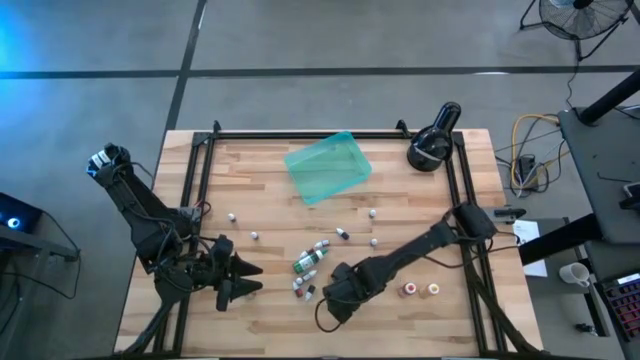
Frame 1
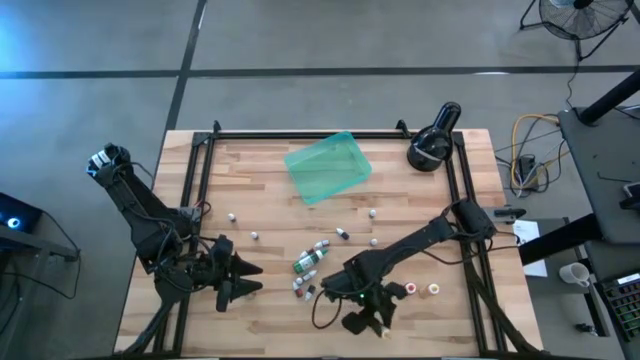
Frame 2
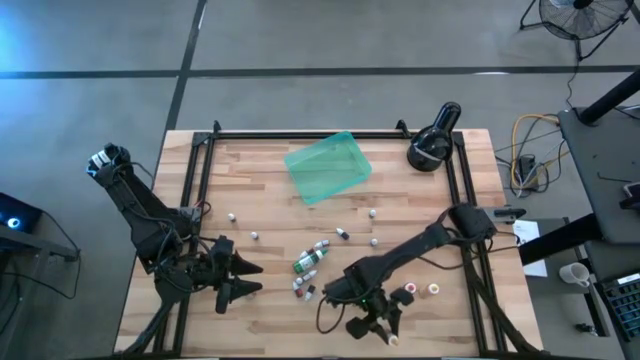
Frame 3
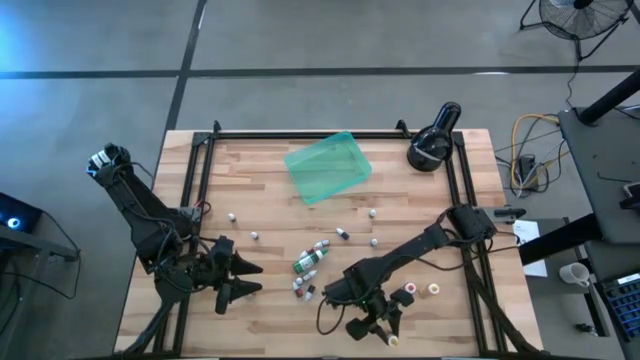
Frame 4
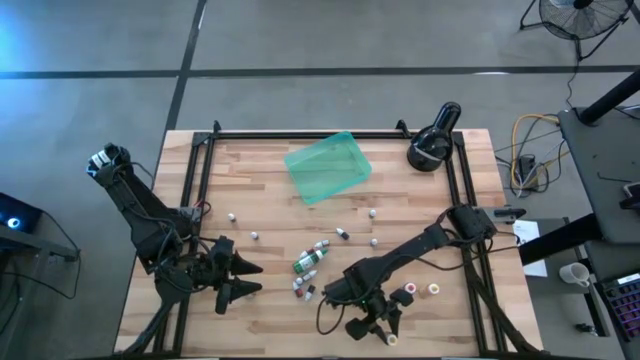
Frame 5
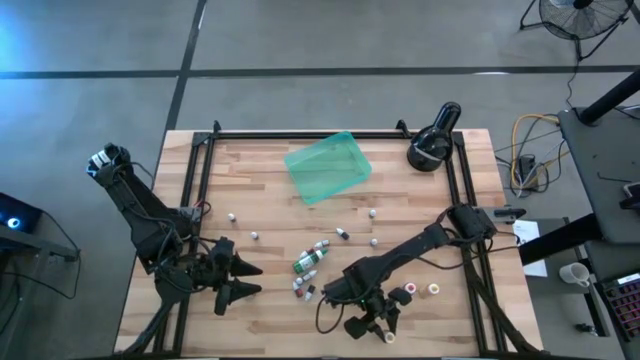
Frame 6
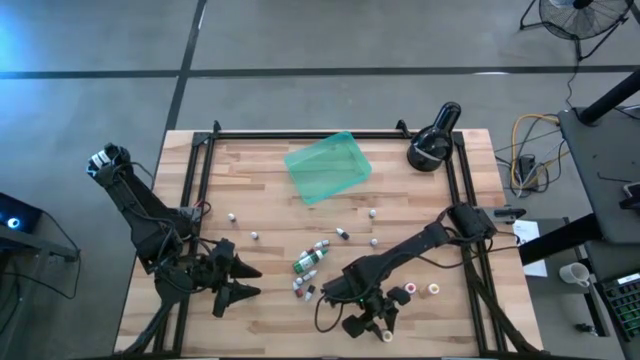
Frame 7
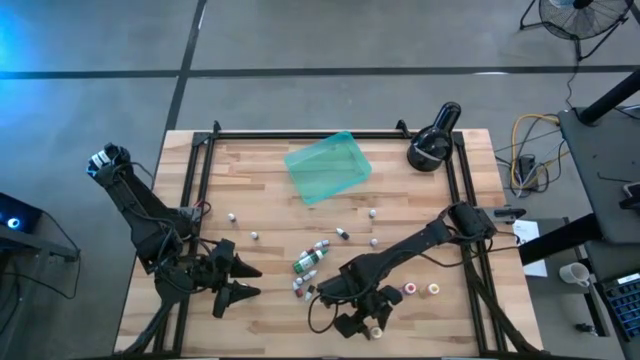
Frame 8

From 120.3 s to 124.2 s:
Task: Pick & Place food coloring
Adjust the yellow small food coloring bottle

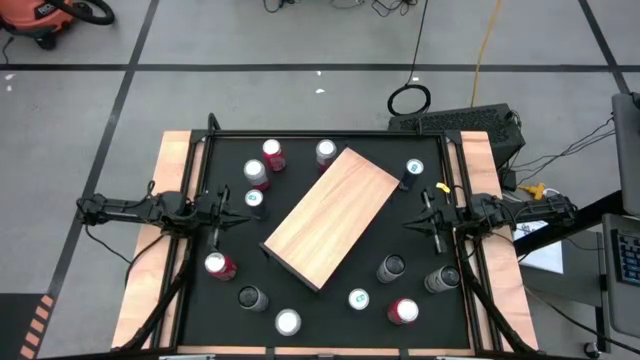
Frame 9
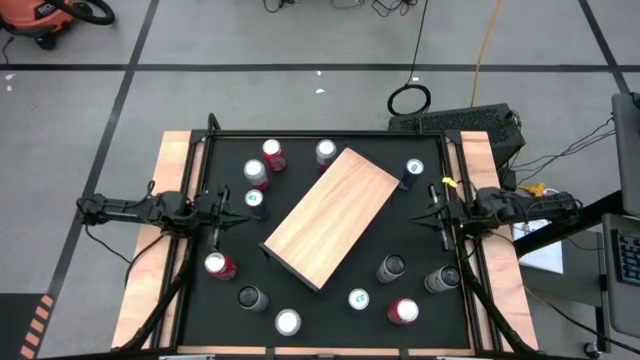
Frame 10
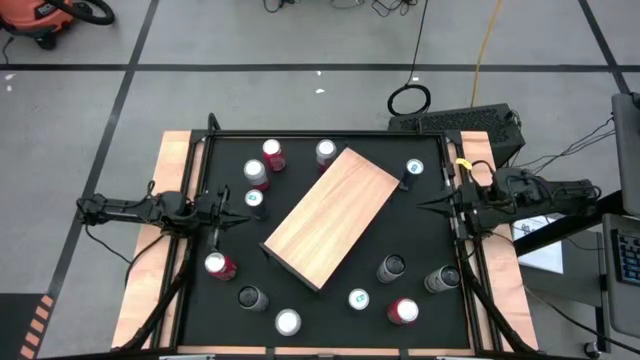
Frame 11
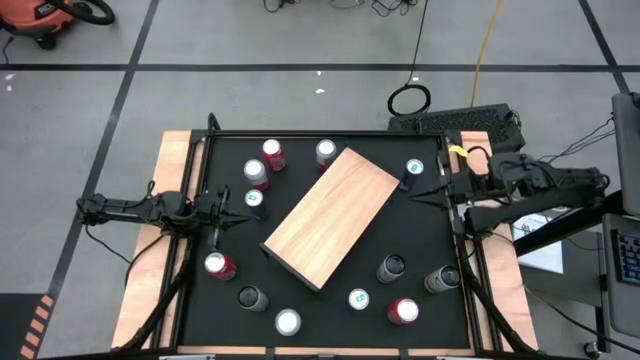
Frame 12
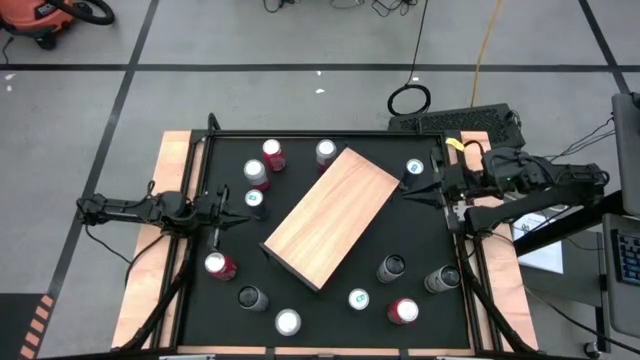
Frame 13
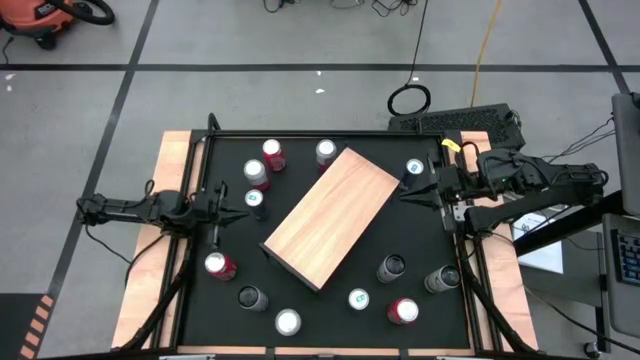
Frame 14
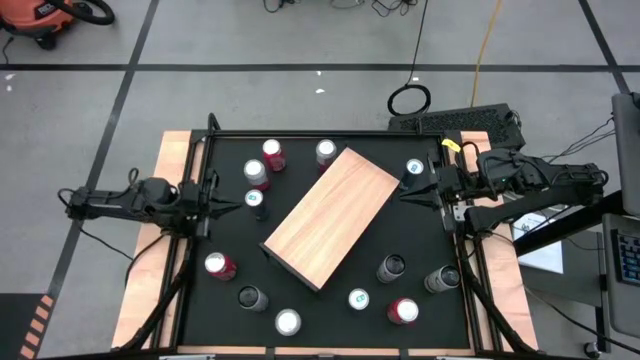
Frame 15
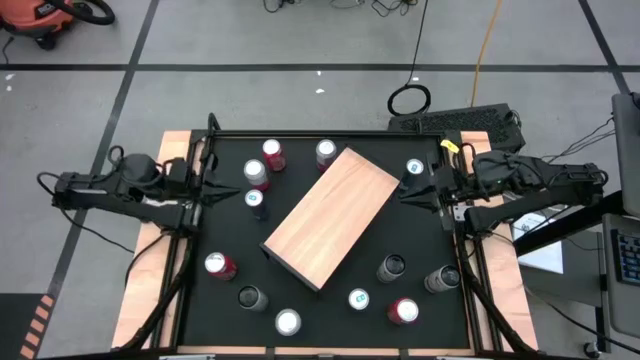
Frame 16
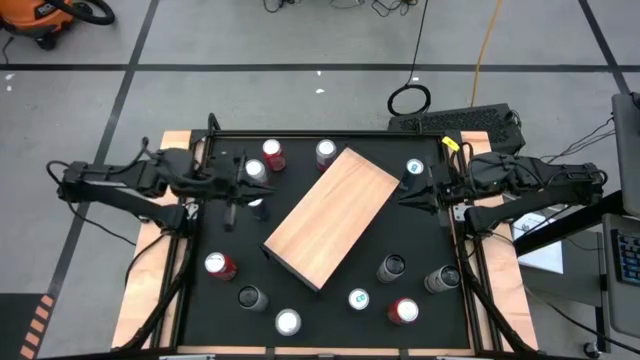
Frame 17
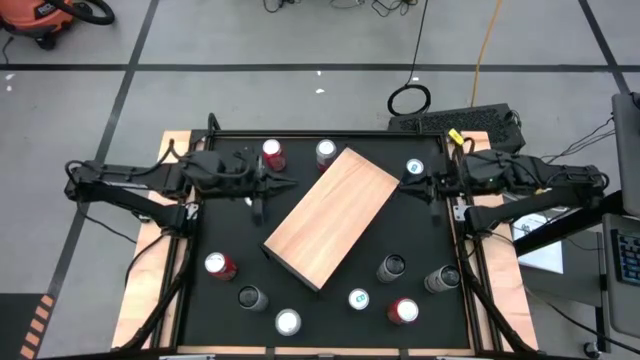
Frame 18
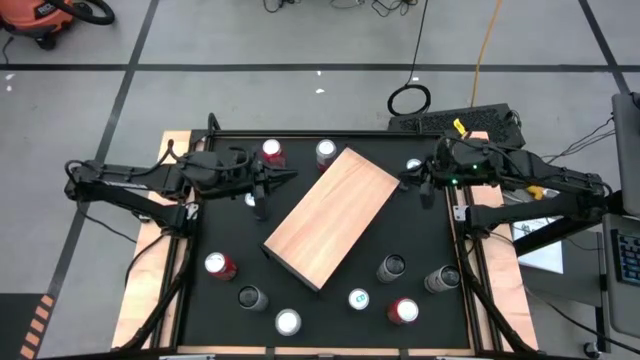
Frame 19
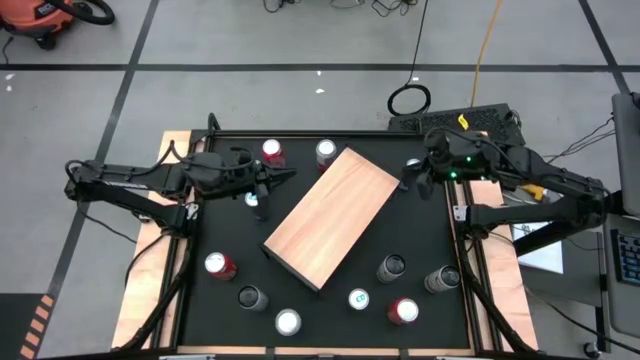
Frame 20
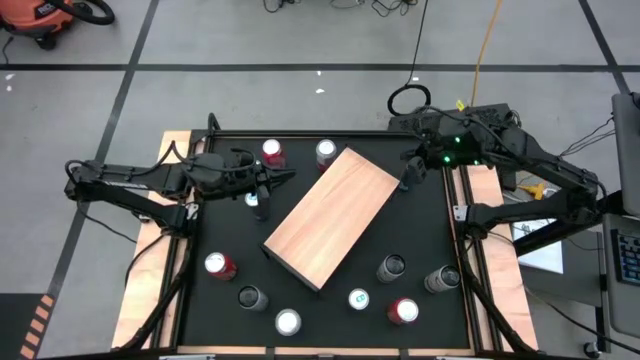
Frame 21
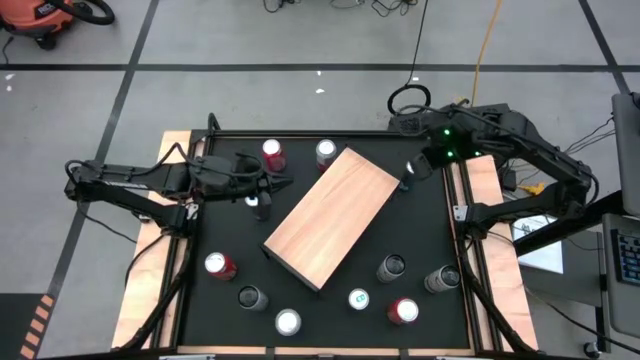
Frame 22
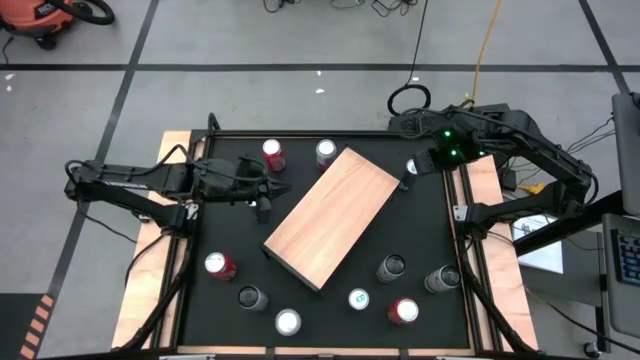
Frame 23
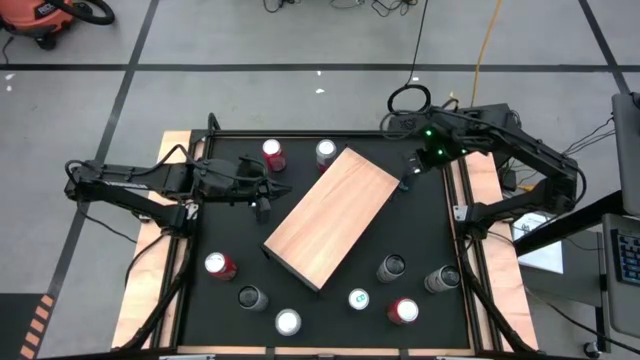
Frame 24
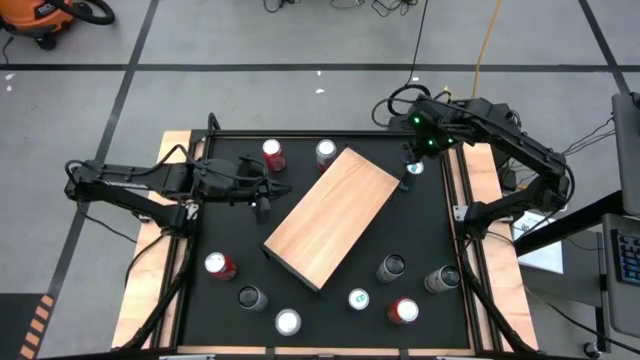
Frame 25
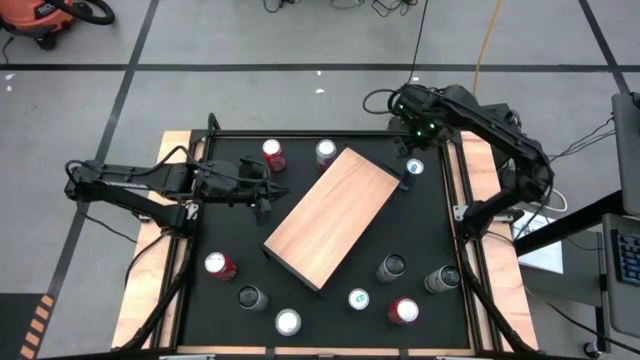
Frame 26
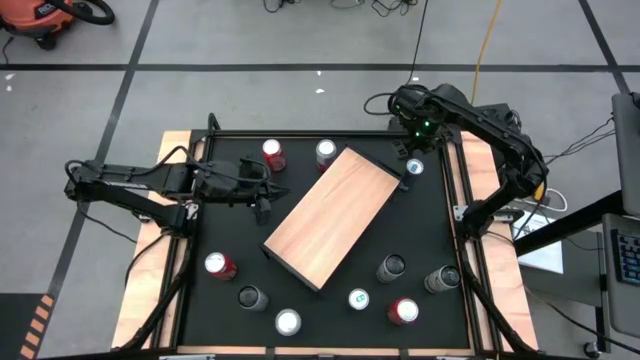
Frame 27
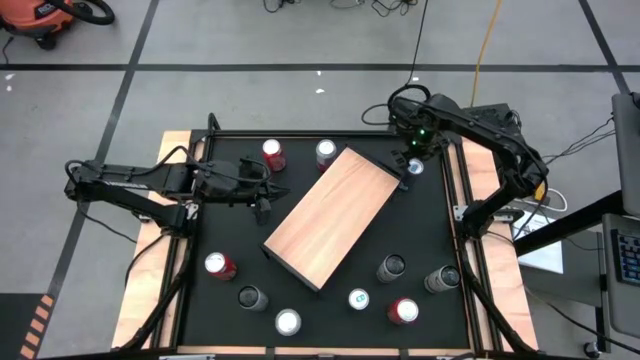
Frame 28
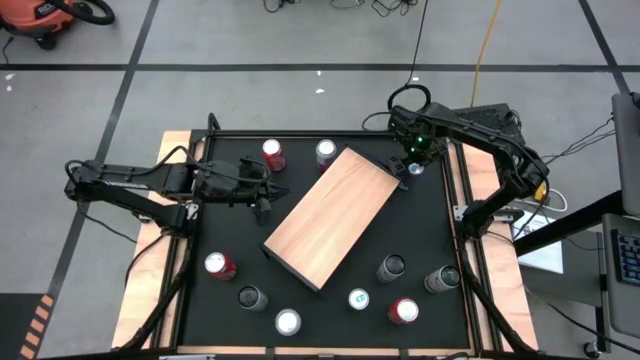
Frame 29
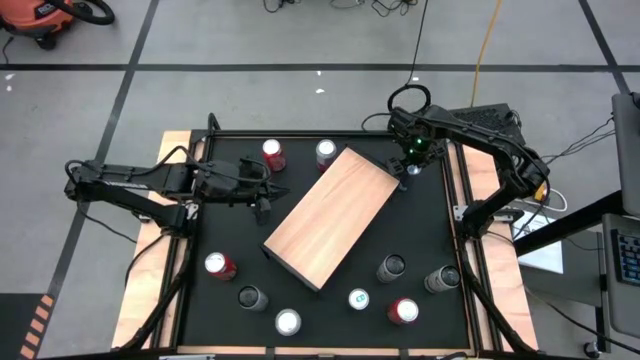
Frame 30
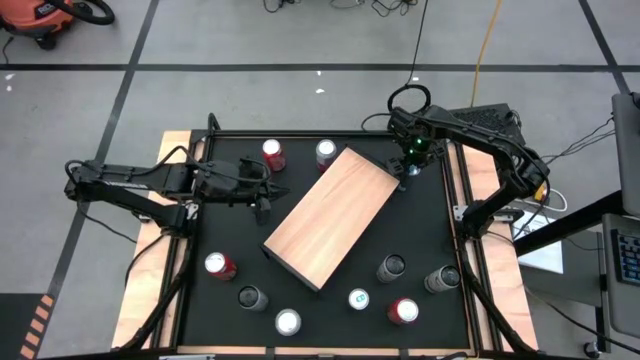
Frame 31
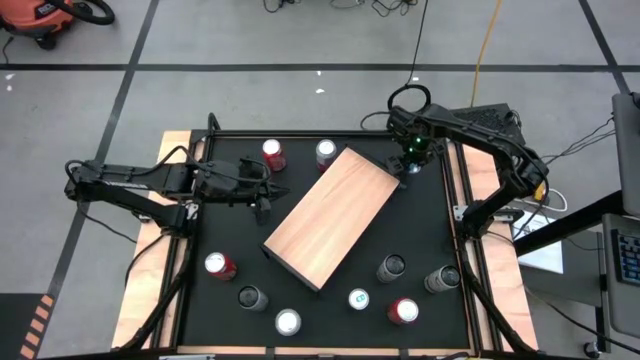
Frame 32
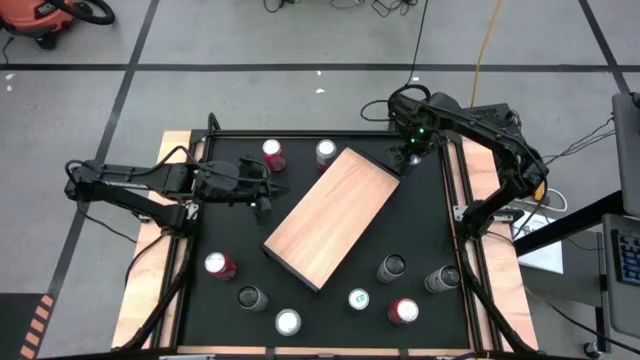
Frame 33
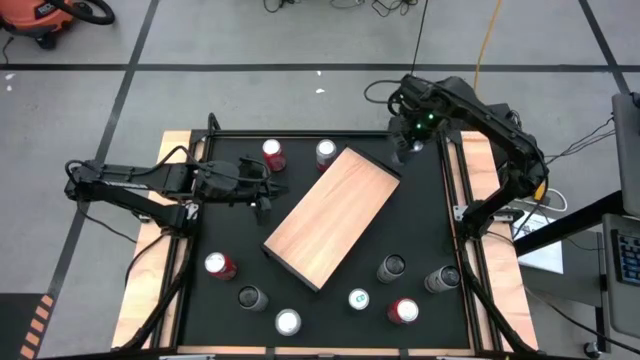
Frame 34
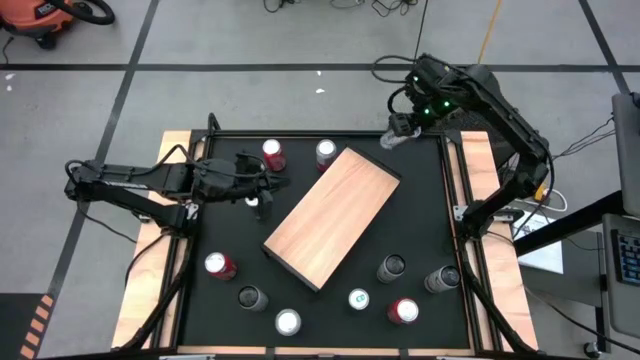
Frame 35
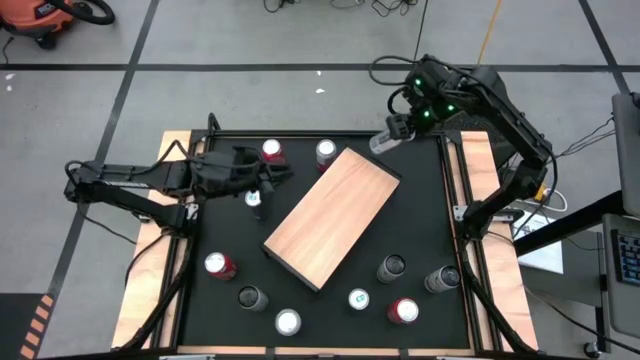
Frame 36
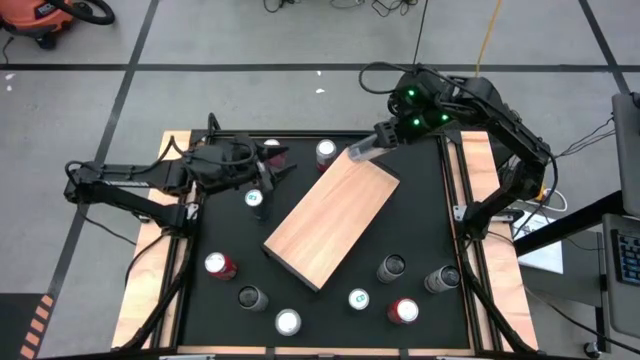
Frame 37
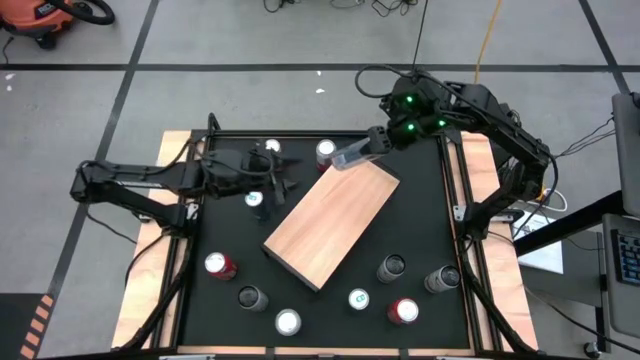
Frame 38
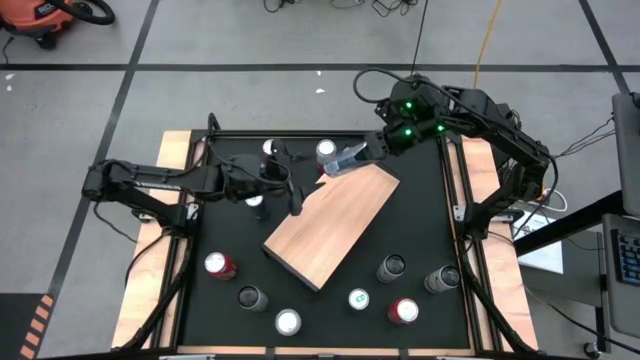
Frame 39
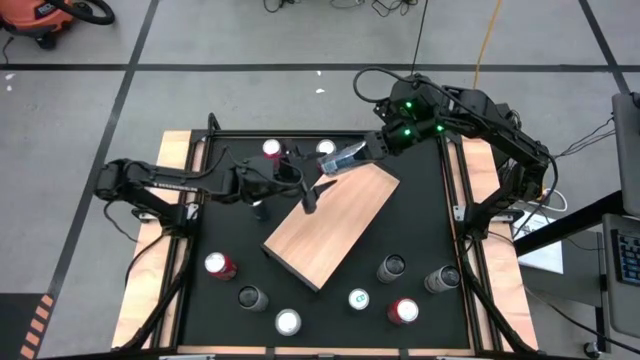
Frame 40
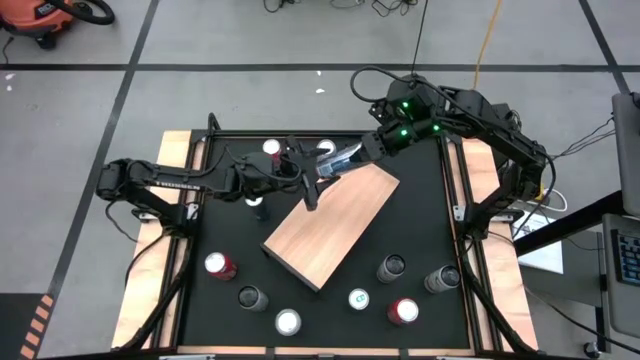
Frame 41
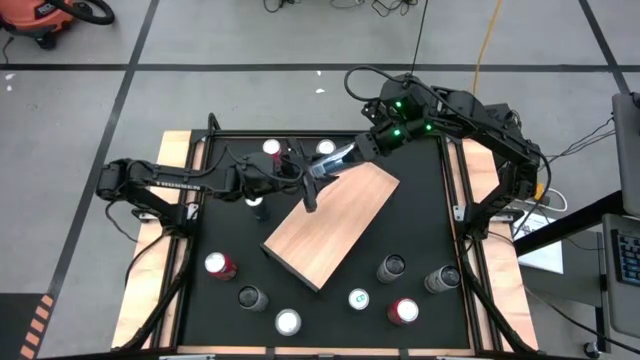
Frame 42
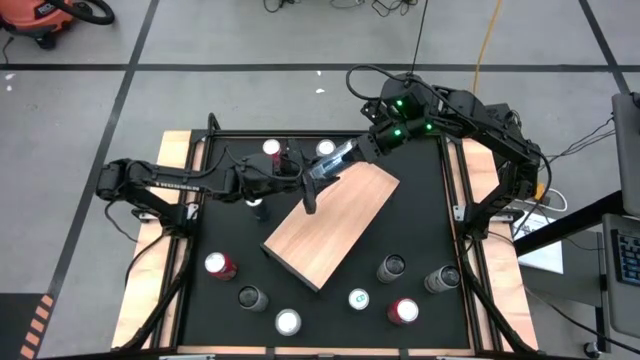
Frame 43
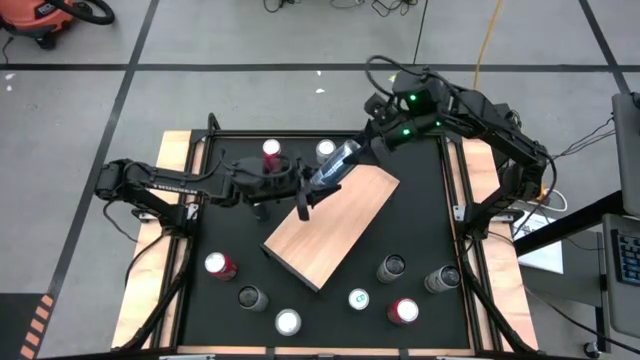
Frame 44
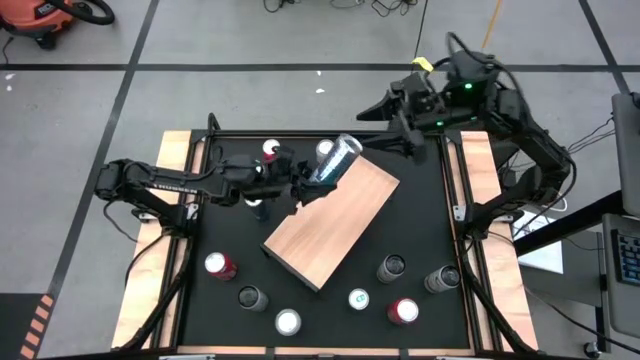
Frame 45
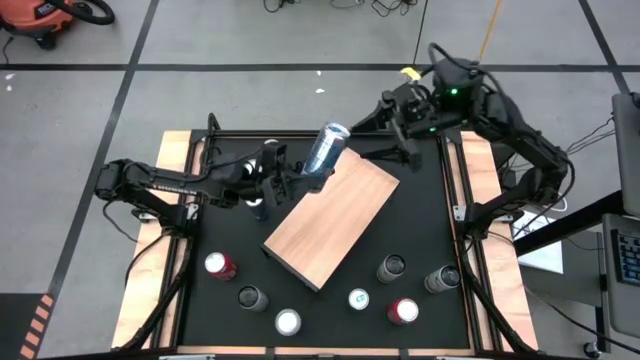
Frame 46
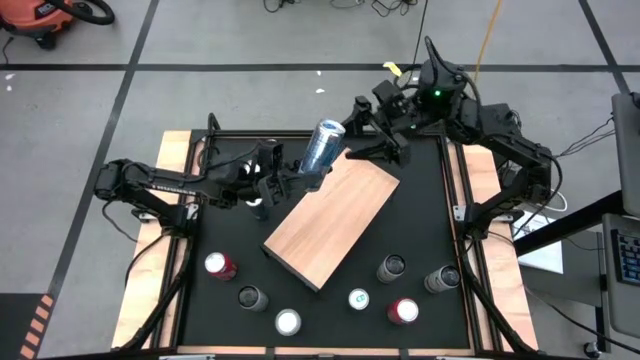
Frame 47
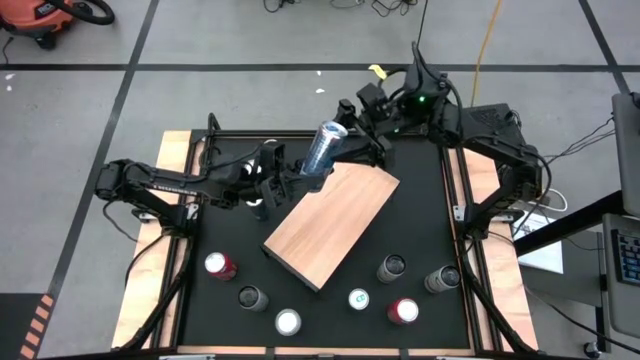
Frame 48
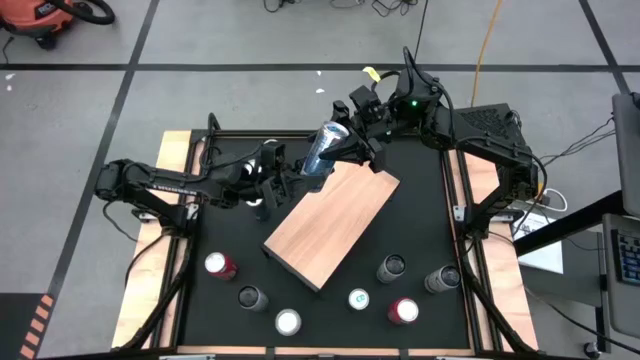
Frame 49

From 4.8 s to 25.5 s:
Task: Place canned beverage on shelf
Put the top blue soda can on the shelf
